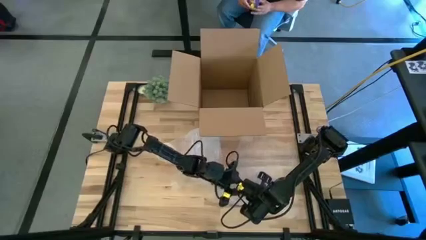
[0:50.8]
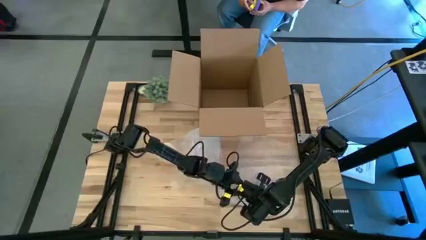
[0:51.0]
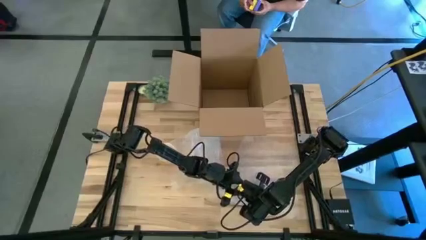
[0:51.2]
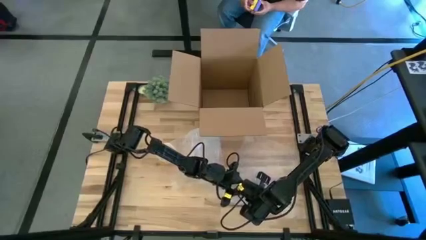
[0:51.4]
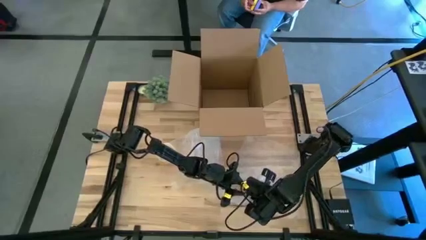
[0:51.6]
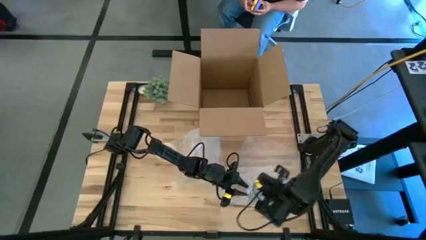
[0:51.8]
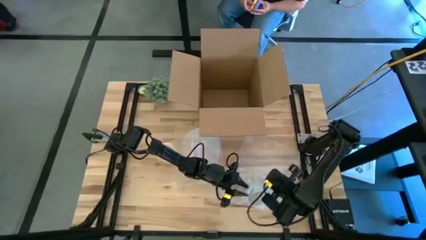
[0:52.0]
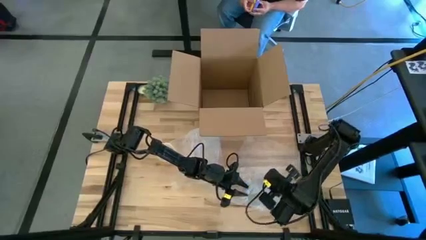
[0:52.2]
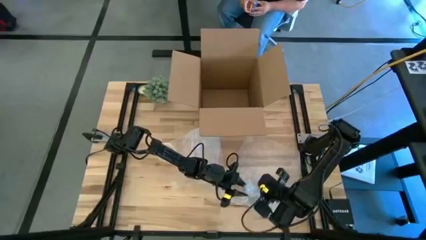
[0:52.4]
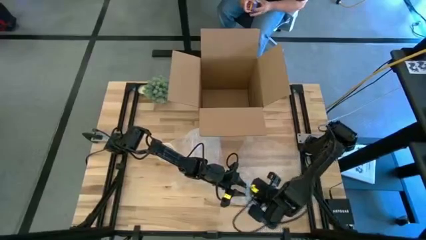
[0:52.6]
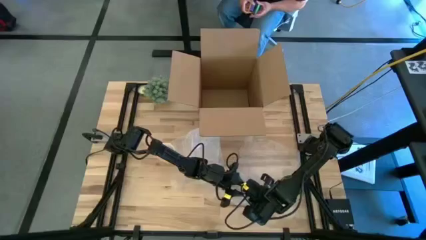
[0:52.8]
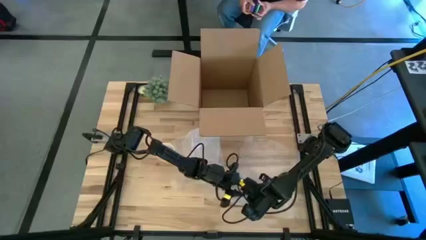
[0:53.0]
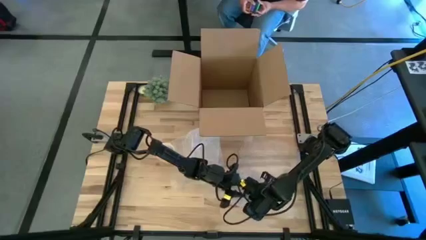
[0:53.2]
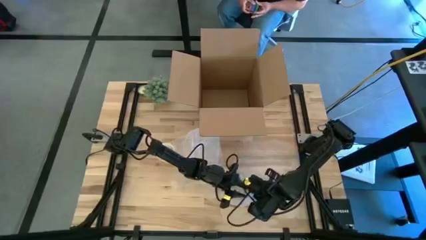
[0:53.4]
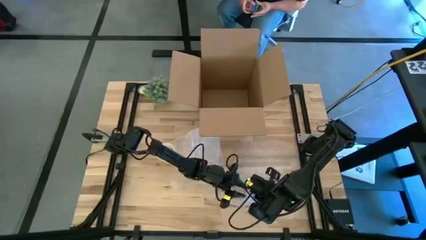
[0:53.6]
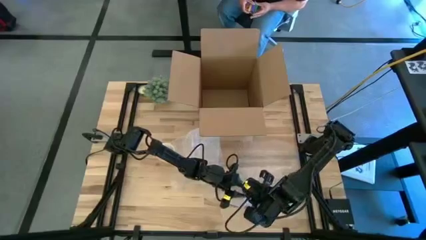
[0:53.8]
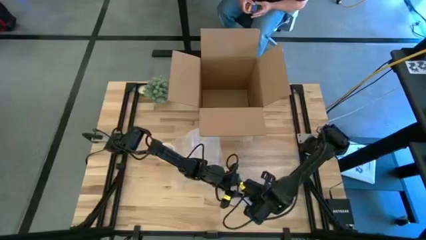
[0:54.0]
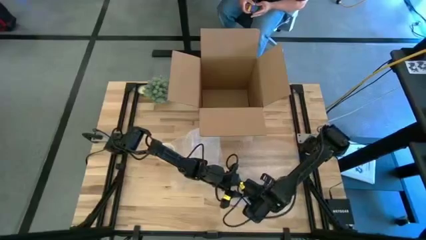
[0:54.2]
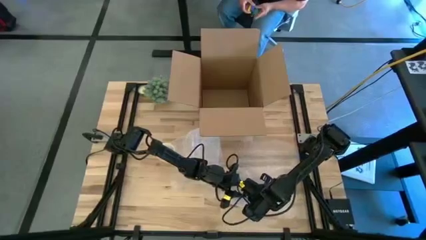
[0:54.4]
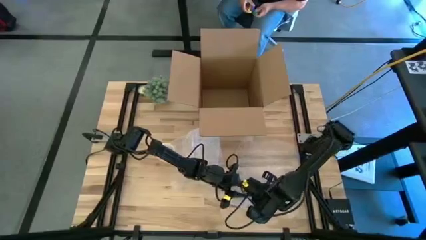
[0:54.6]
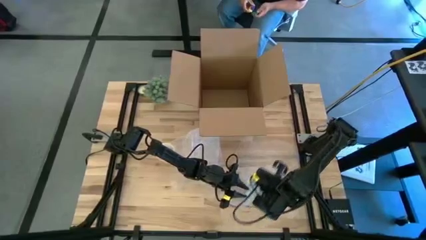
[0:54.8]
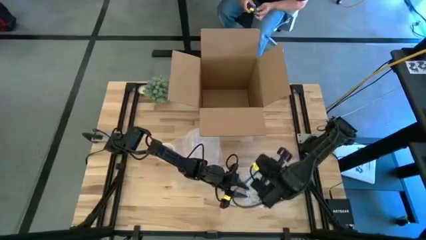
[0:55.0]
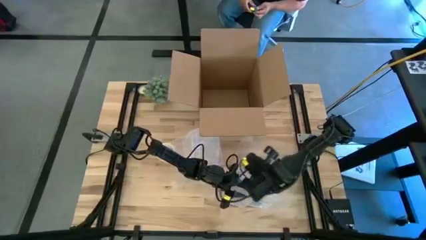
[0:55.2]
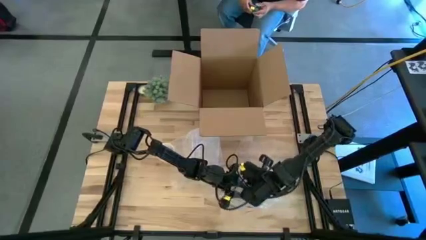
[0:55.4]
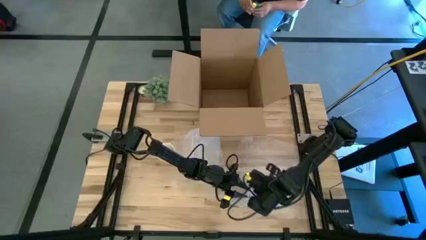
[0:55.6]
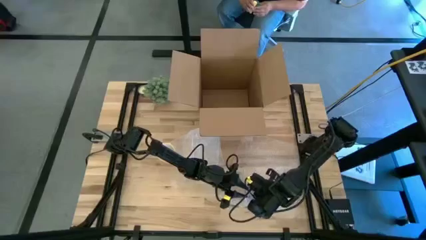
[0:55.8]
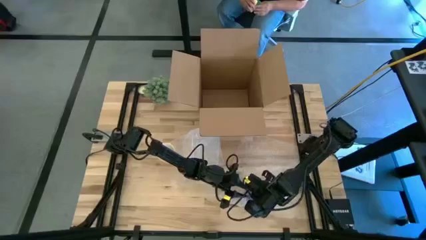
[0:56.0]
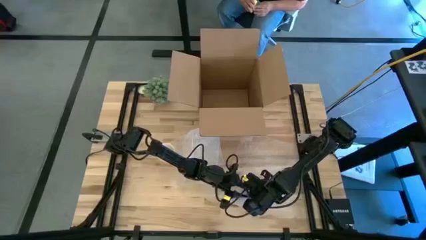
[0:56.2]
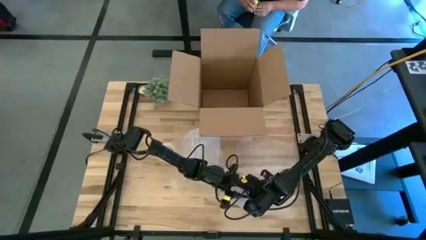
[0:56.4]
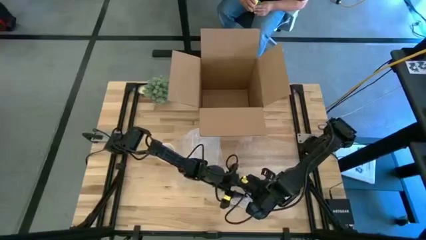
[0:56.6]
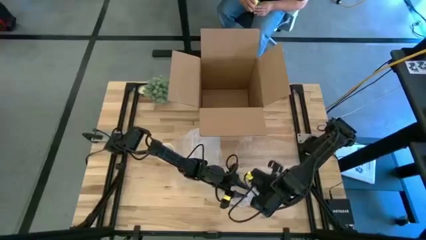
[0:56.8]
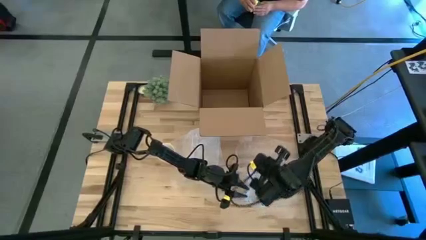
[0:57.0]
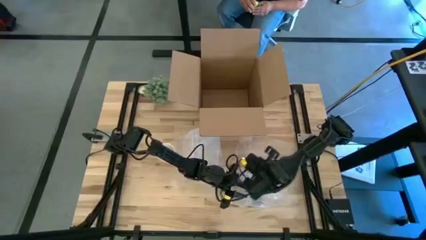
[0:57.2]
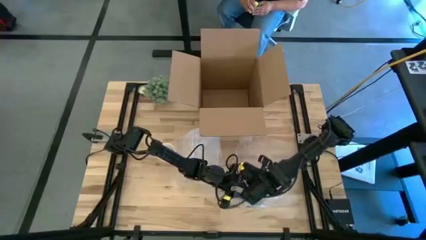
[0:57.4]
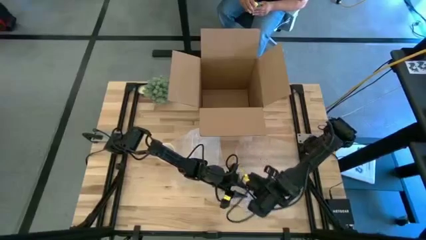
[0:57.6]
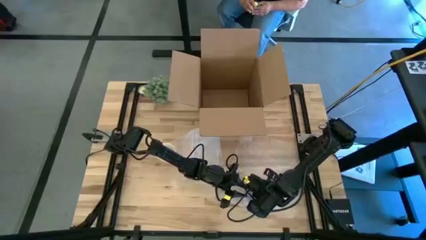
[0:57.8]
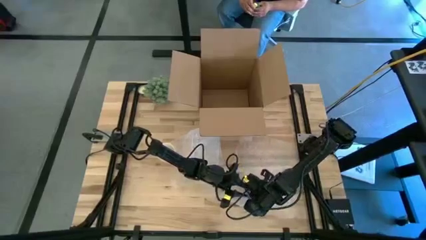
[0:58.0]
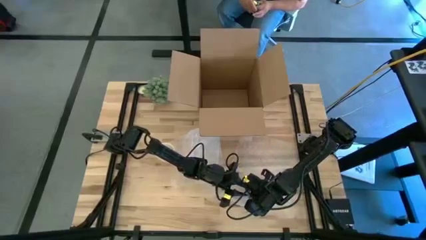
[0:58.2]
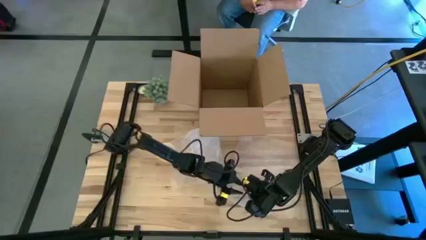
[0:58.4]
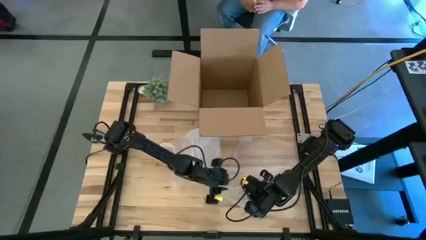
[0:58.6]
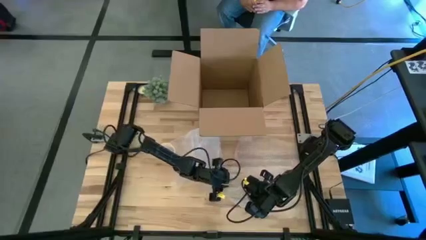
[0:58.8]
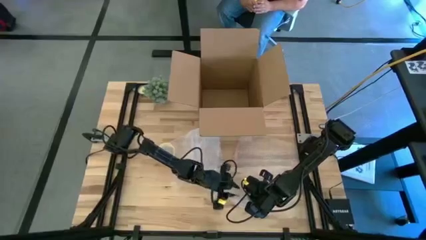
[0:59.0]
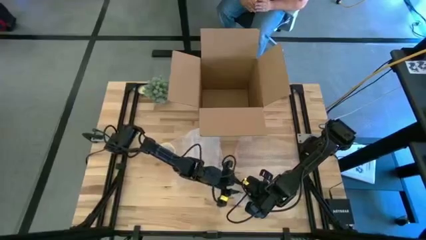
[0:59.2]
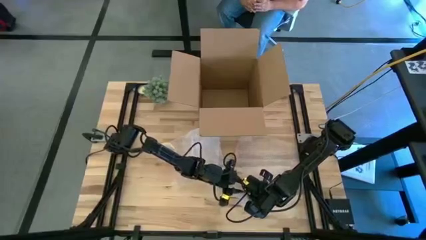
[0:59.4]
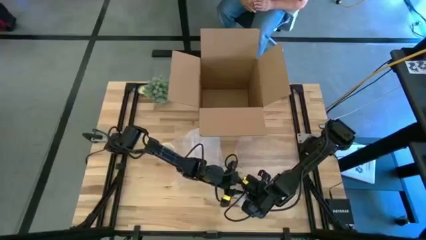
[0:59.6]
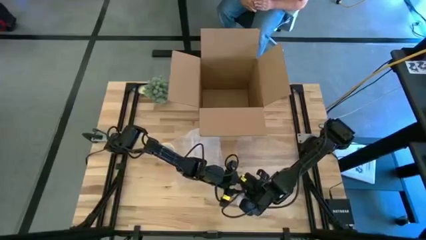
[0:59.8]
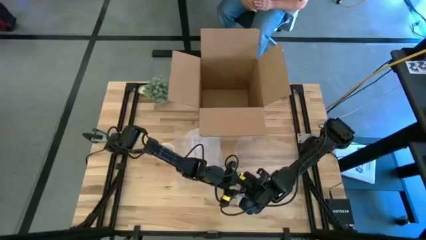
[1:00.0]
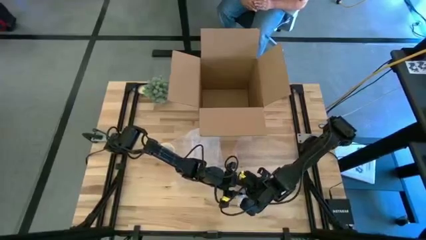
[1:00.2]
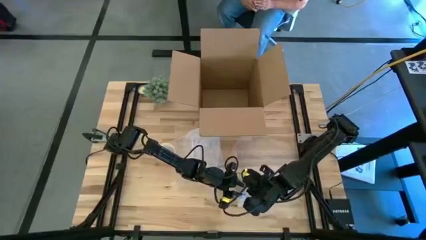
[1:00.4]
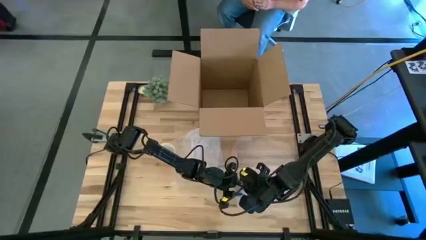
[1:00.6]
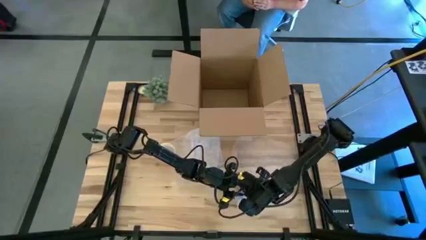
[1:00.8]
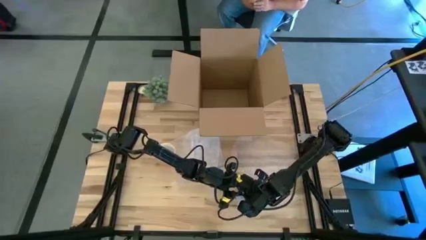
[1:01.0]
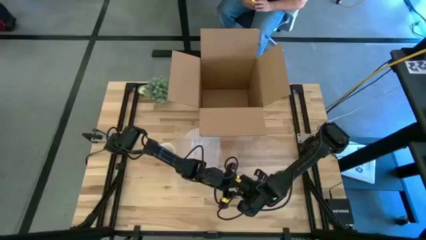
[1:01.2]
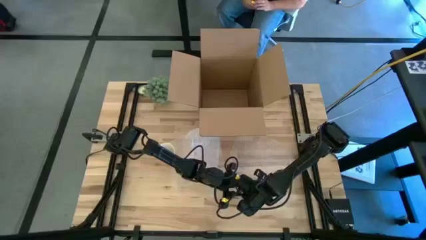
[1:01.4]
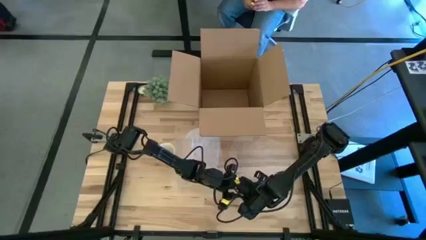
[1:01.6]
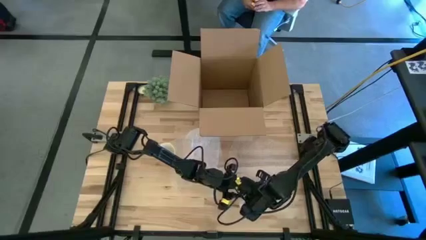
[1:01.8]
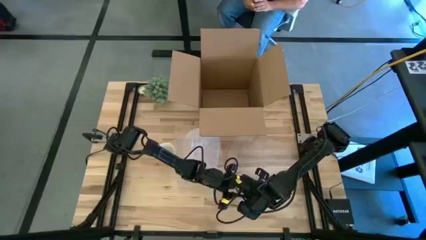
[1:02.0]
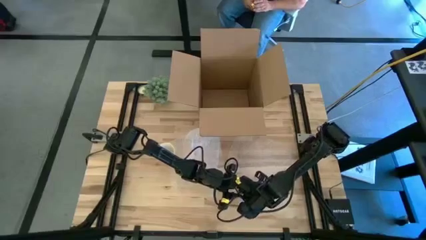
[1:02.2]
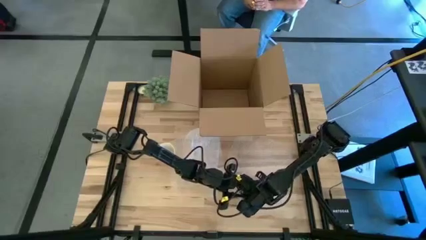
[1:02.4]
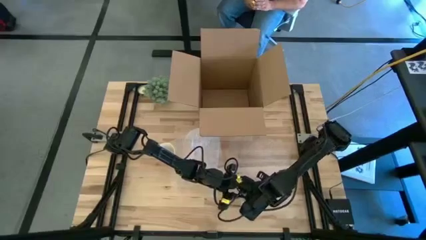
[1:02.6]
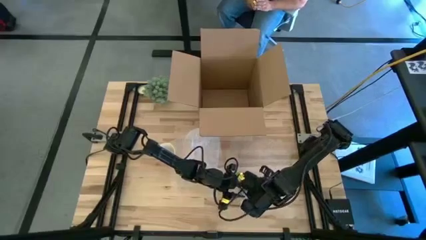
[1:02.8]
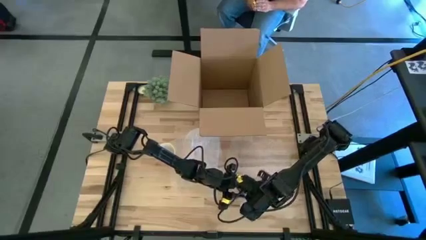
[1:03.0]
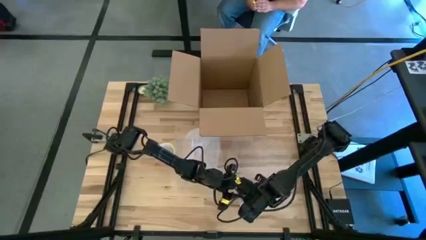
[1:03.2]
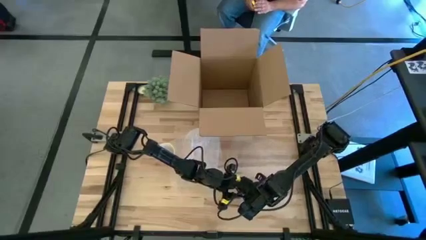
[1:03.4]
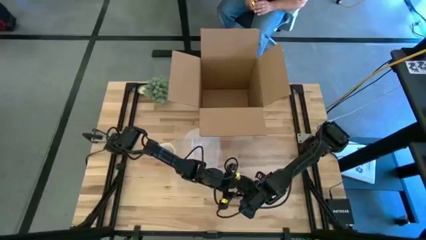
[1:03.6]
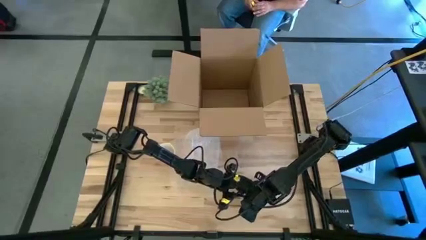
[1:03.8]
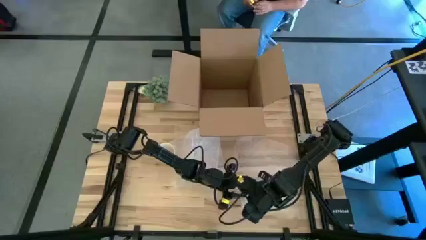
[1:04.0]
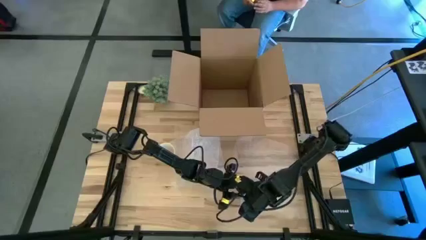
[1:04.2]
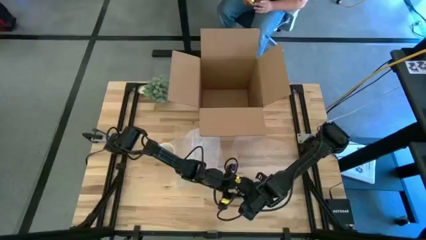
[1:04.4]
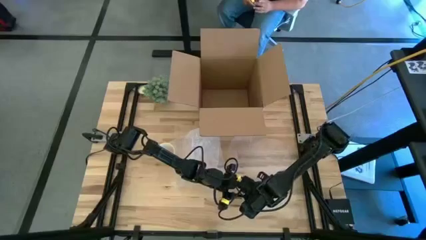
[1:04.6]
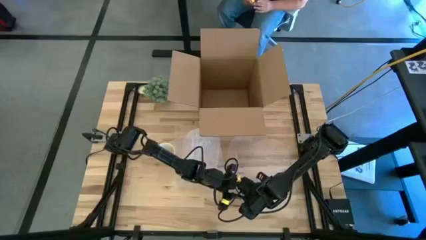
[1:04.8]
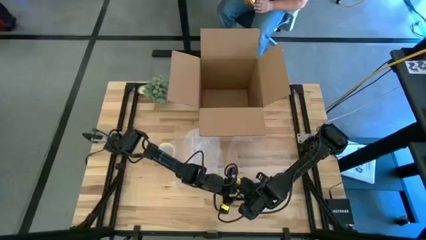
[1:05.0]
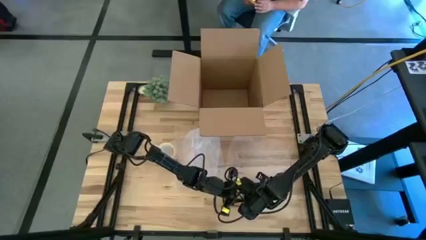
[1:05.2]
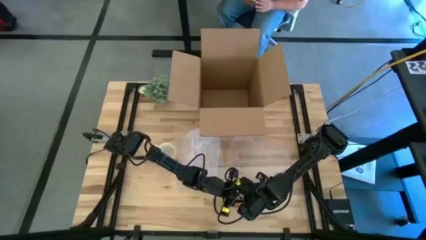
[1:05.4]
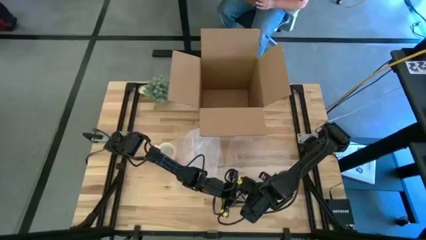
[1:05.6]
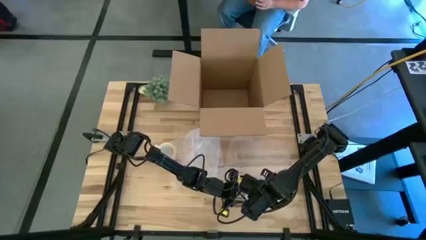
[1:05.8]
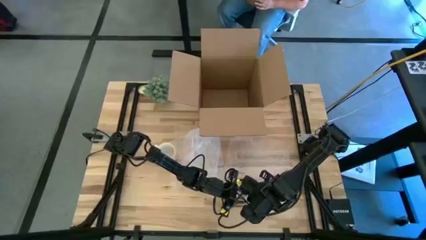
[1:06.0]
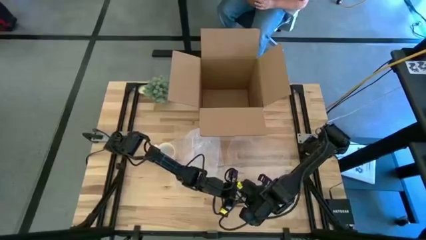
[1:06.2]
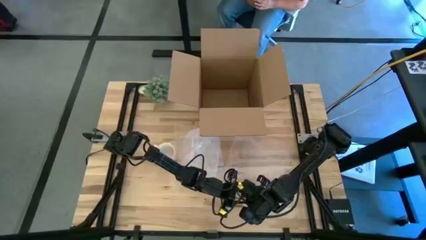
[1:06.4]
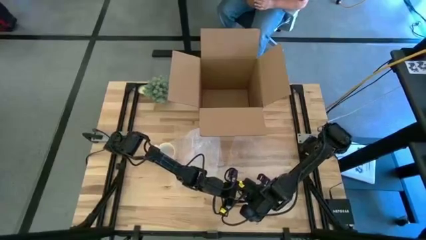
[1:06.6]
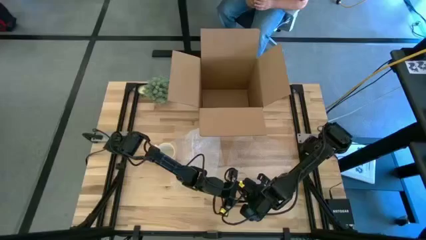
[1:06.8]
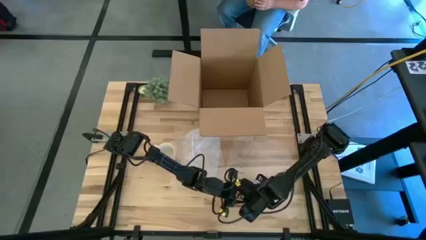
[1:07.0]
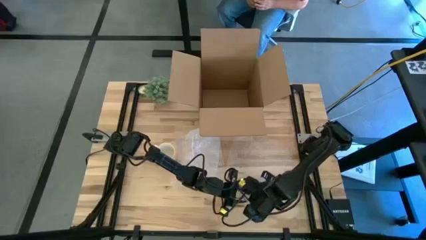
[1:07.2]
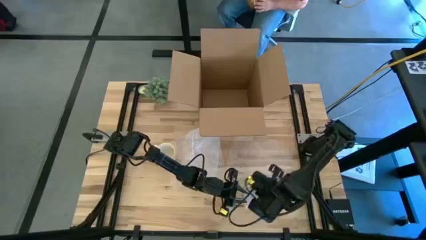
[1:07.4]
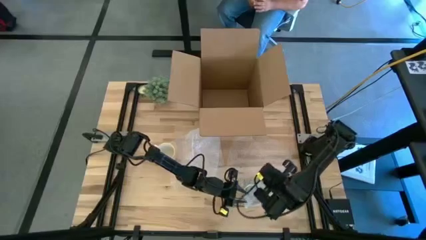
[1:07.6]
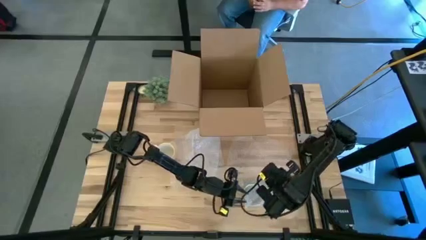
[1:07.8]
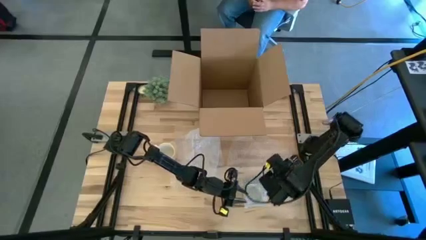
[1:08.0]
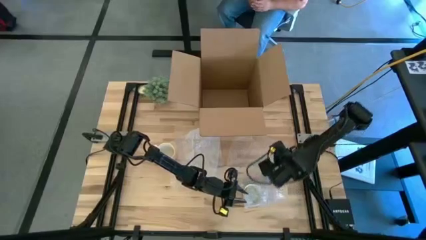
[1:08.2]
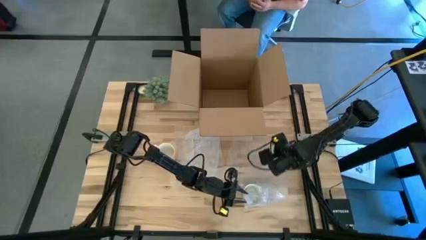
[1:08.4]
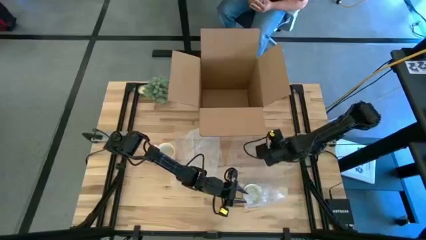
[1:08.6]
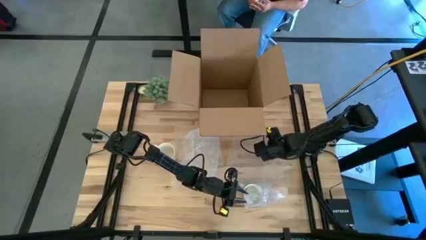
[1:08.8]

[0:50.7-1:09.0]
Task: wrap mug
Wrap the red mug with the right bubble wrap
